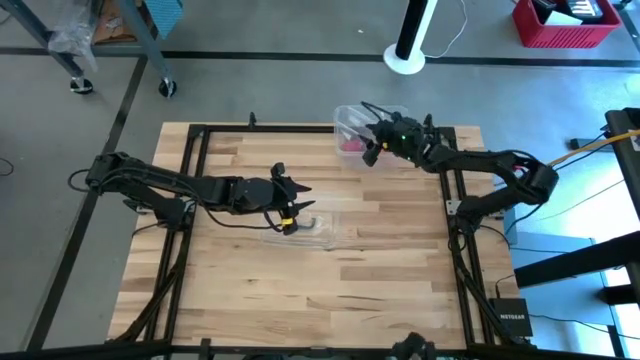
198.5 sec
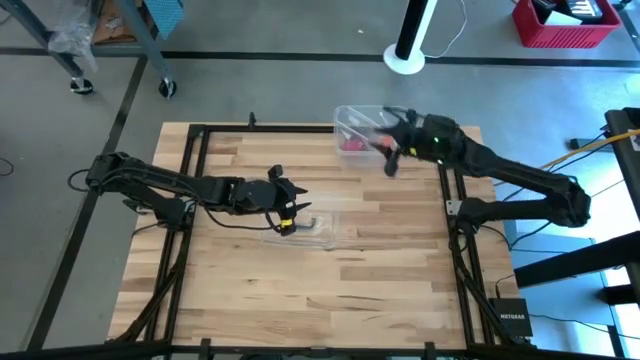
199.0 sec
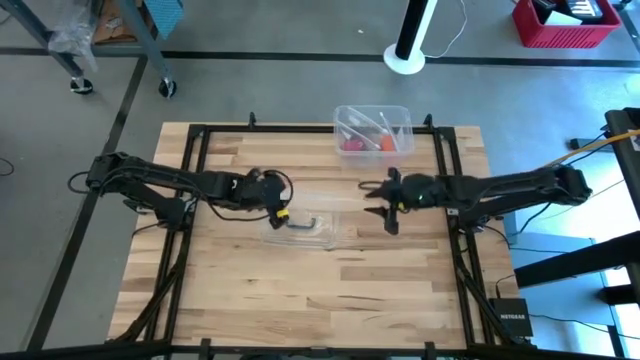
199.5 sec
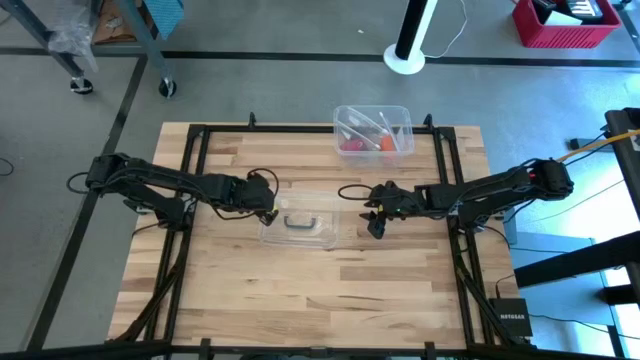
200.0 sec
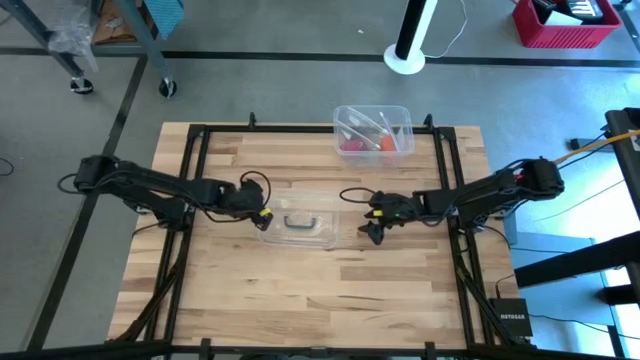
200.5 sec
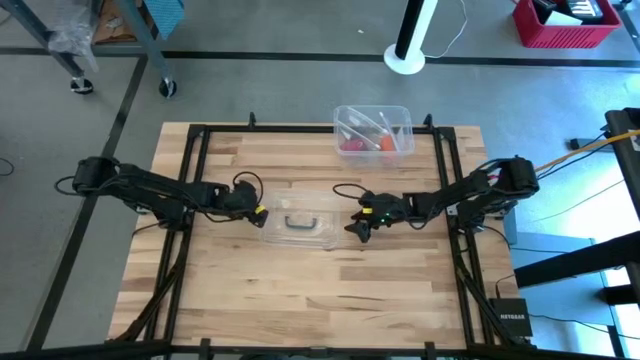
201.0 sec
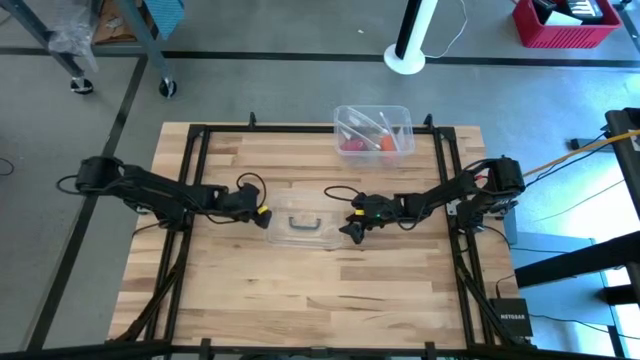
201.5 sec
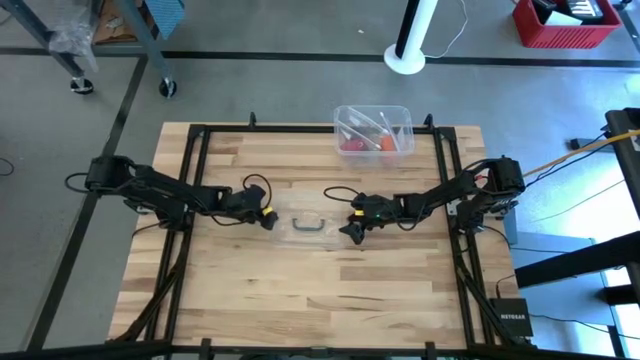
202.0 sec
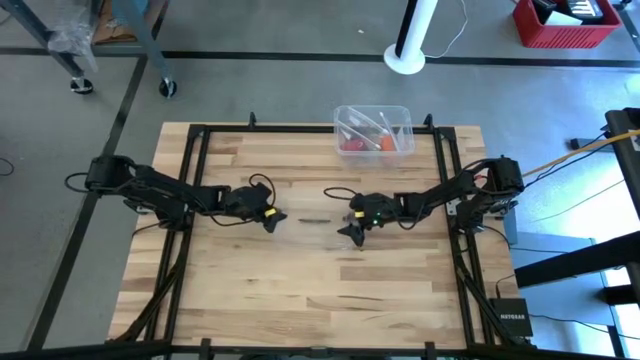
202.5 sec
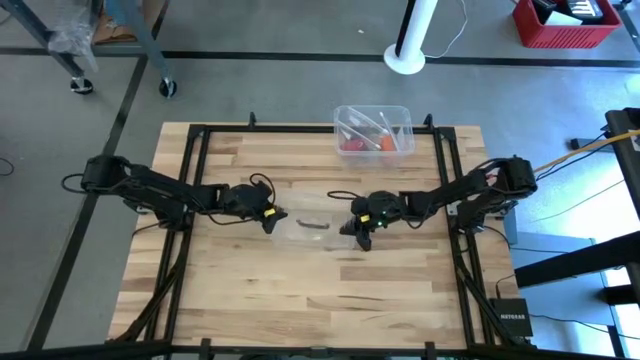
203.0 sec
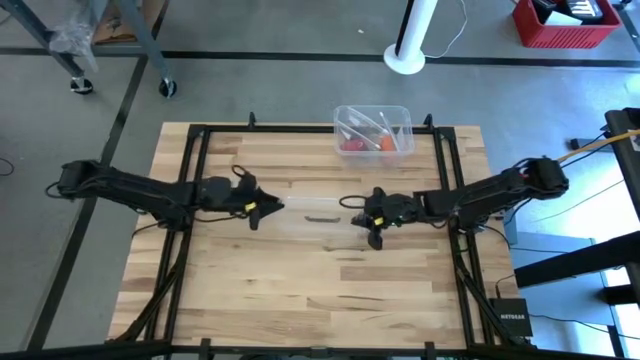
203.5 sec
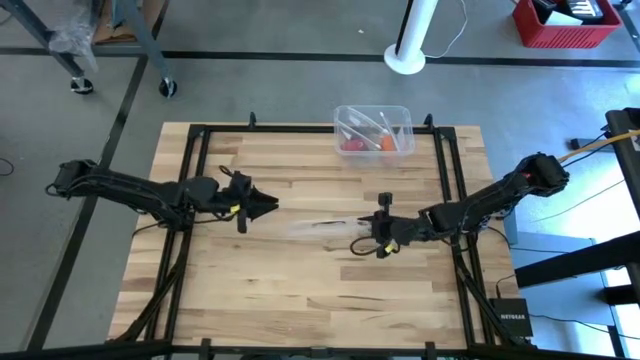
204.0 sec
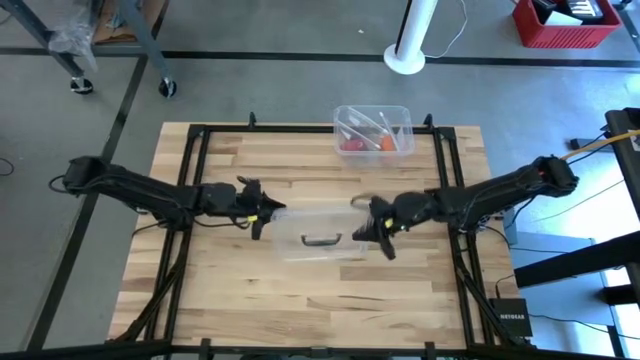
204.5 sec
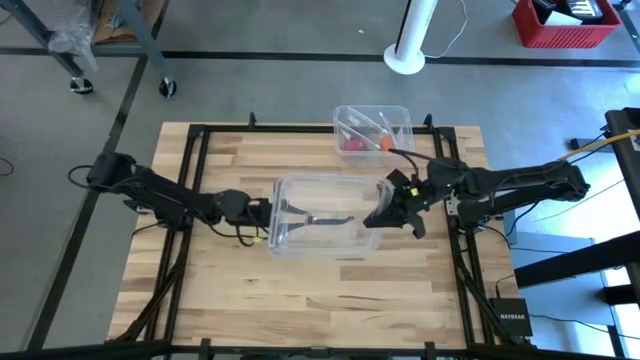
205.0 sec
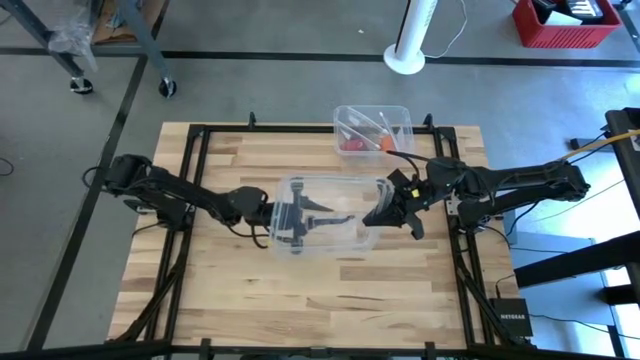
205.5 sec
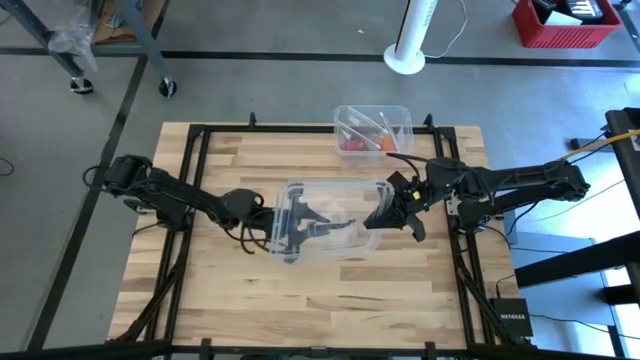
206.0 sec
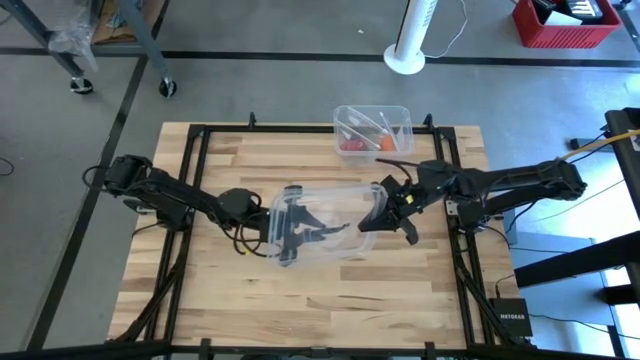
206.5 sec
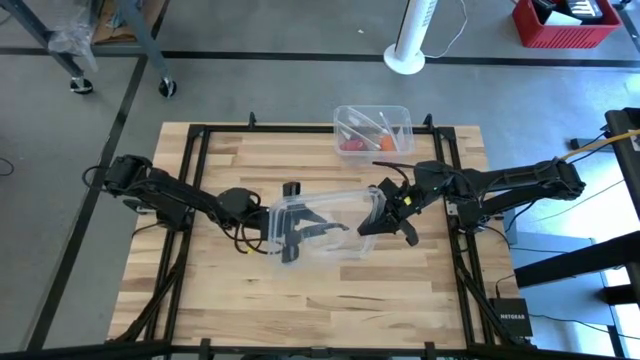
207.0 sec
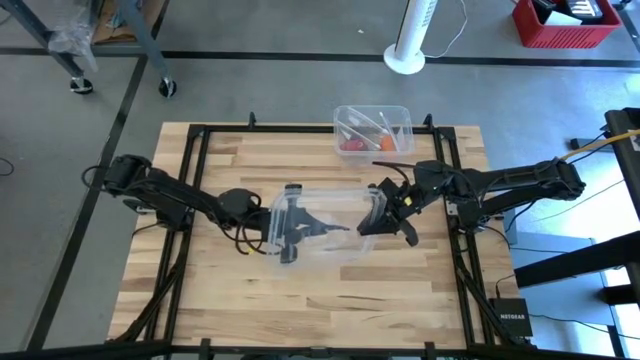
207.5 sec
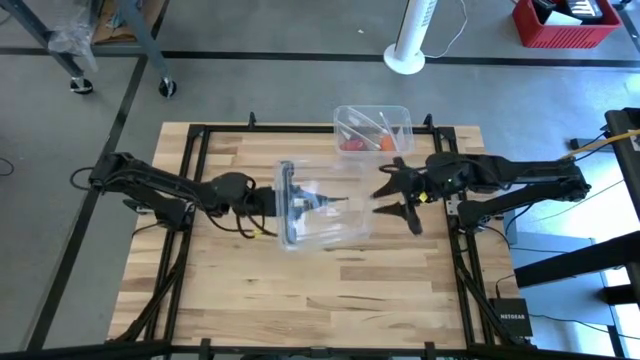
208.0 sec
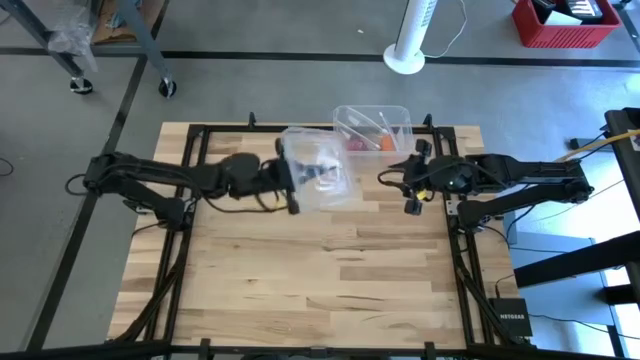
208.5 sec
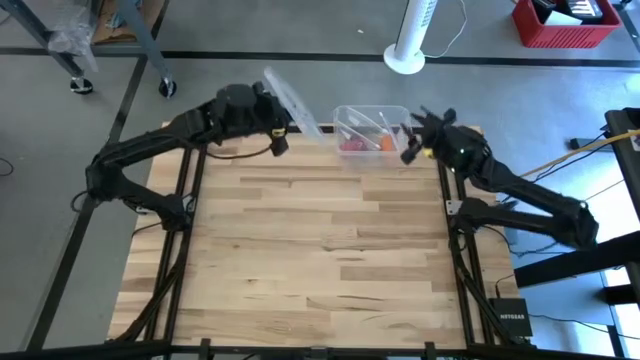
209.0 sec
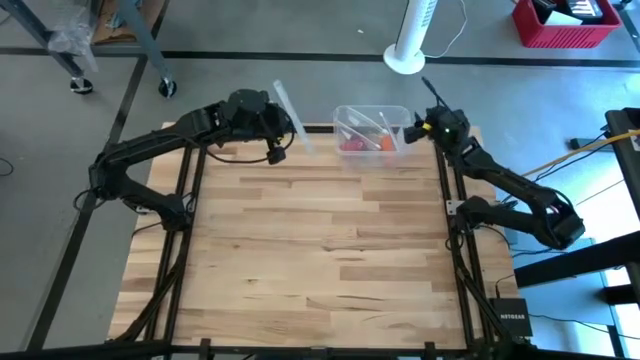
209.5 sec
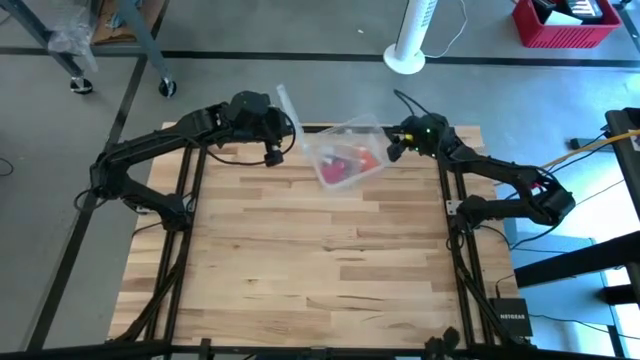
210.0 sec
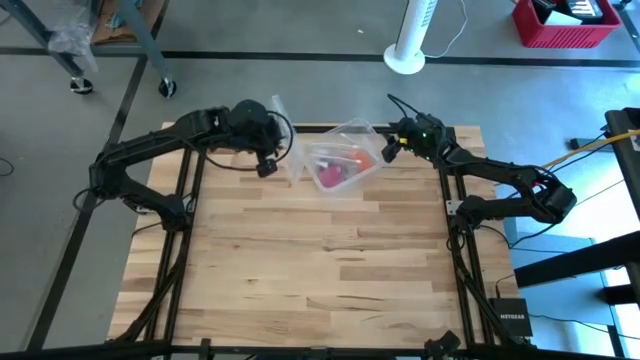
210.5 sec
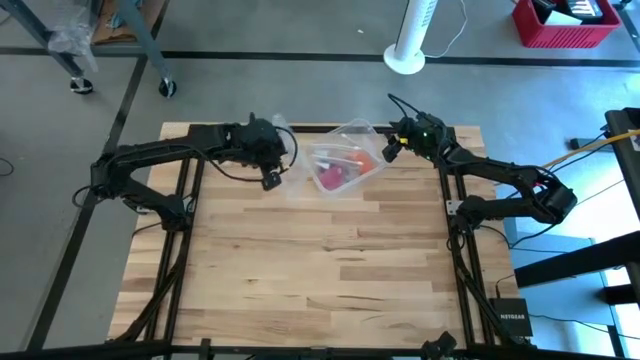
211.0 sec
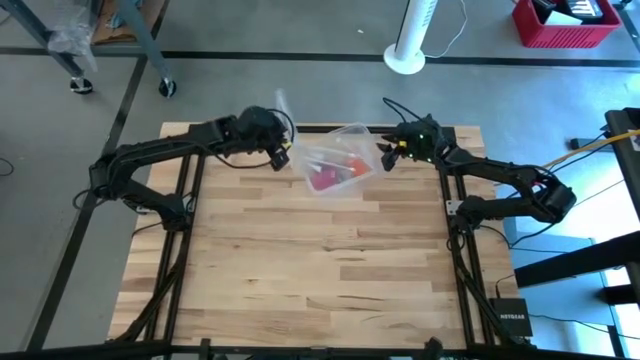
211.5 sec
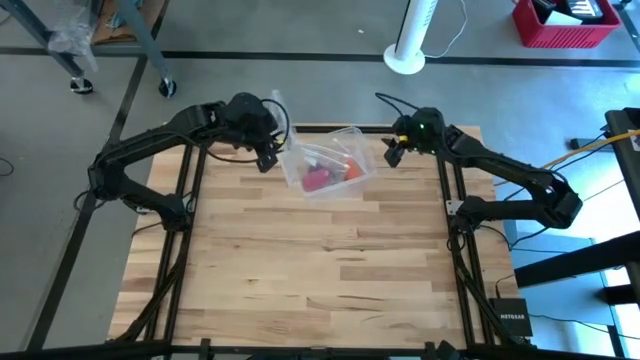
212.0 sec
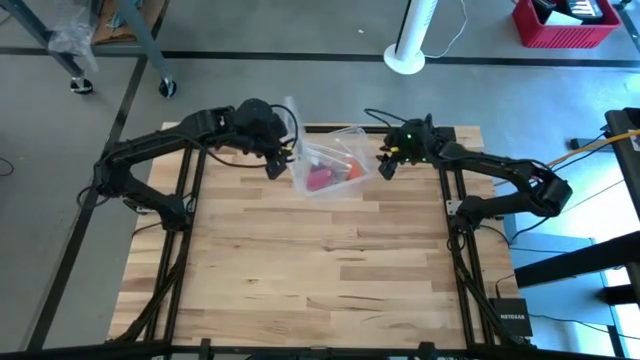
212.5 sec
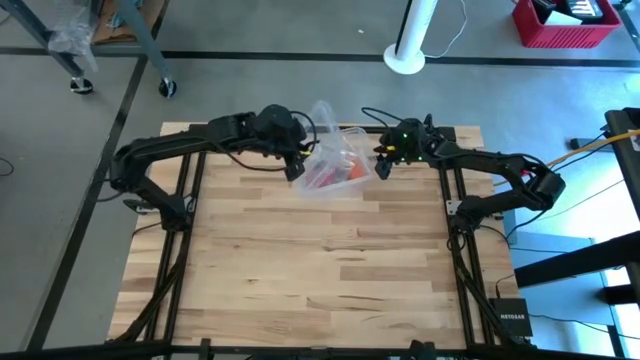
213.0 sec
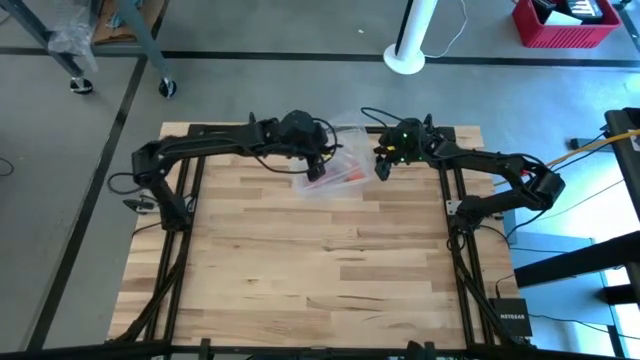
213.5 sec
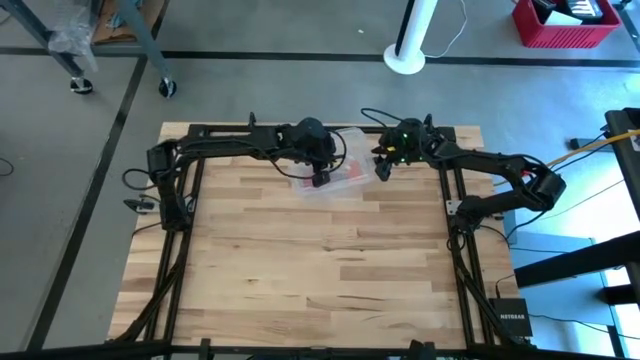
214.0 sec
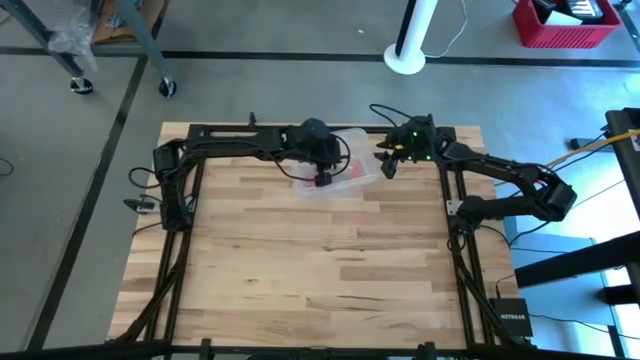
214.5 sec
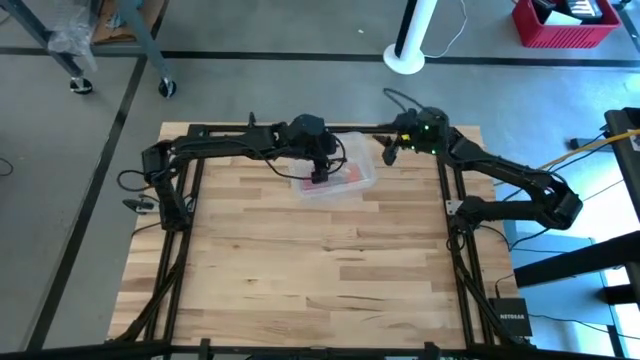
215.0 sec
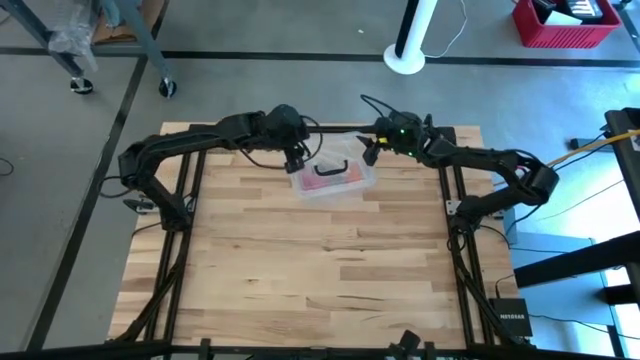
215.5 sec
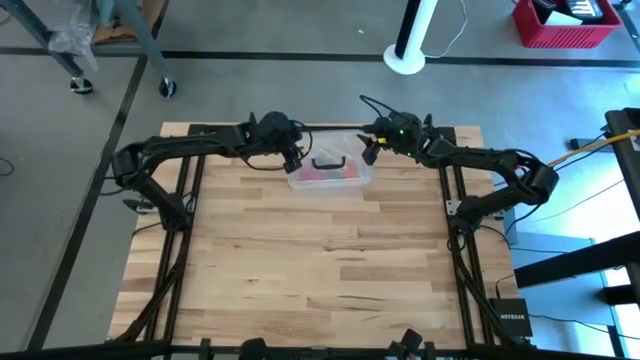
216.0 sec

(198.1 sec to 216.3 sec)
Task: Roll bandage
Close the transparent bin

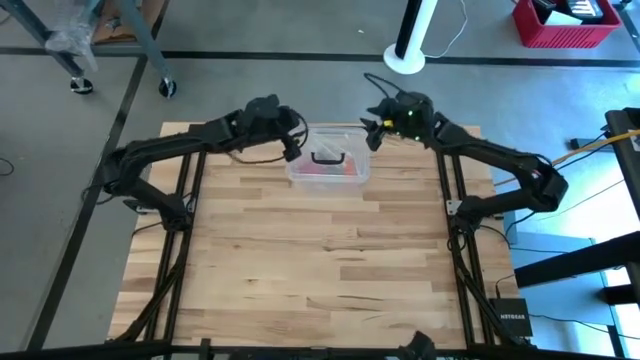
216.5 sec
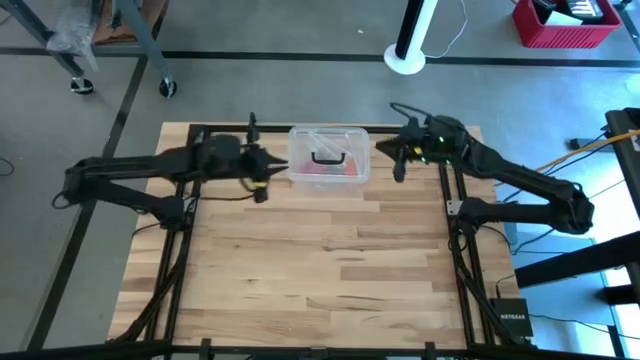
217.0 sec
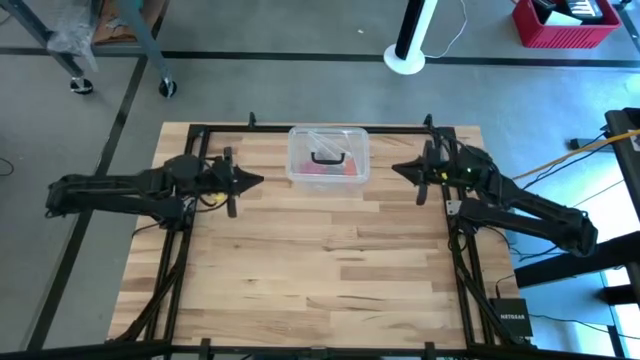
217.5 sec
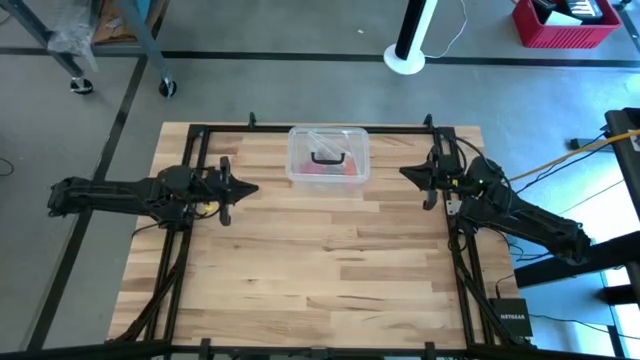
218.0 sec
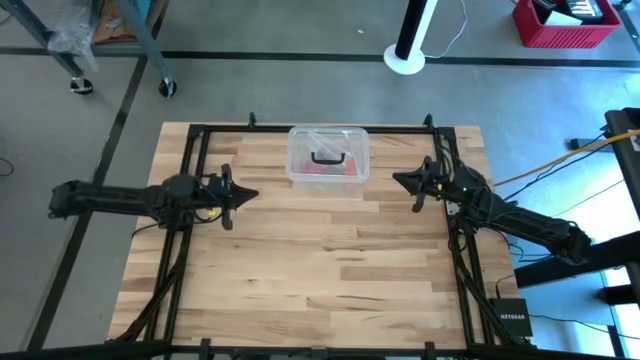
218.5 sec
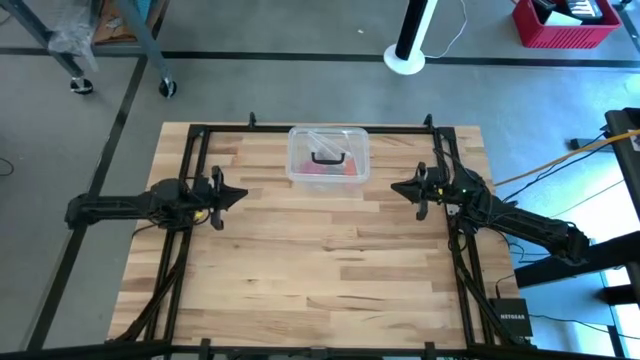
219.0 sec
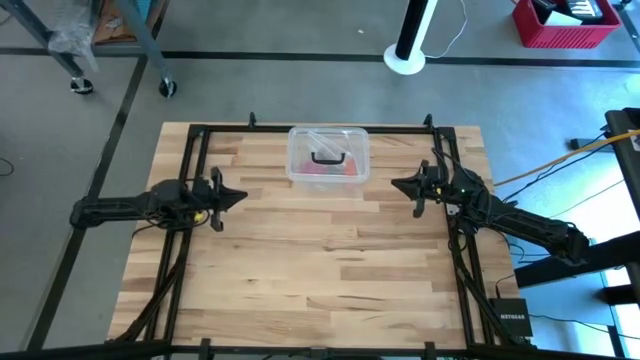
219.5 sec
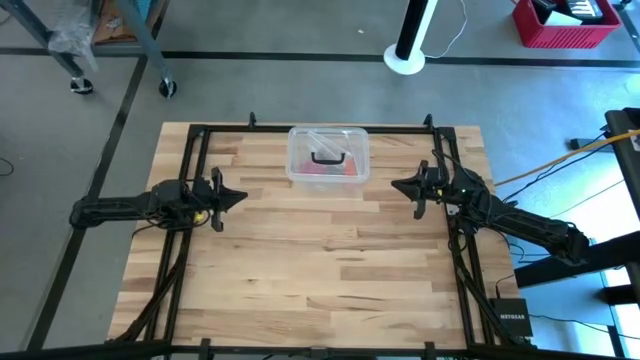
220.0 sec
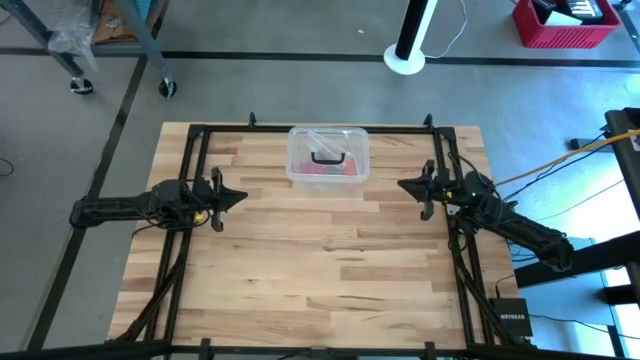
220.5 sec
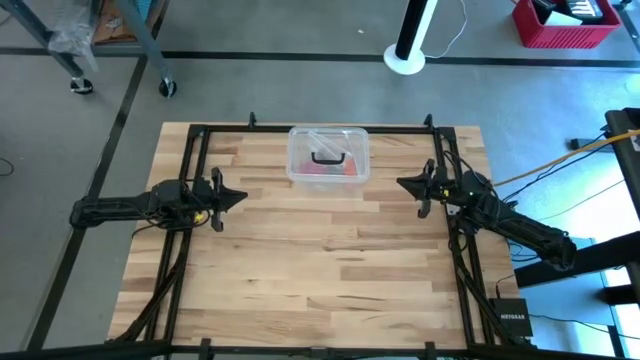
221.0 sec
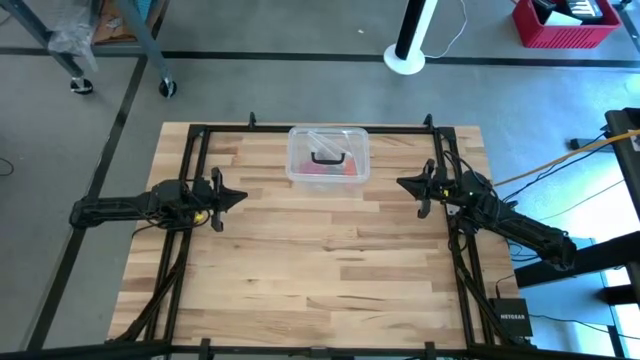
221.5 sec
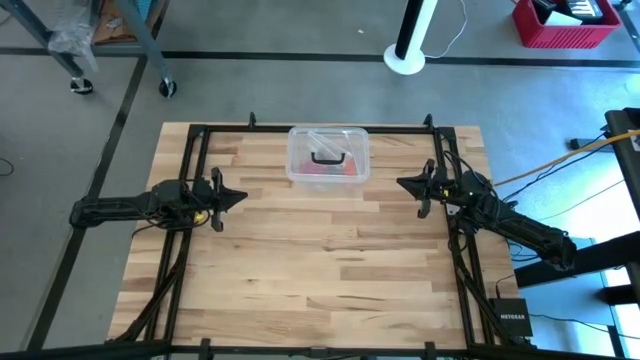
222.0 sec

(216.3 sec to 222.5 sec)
Return to Home Position
